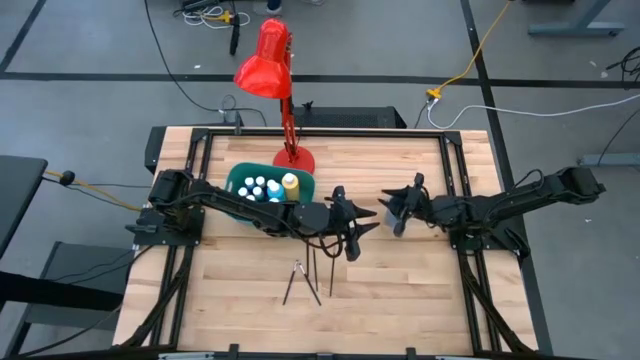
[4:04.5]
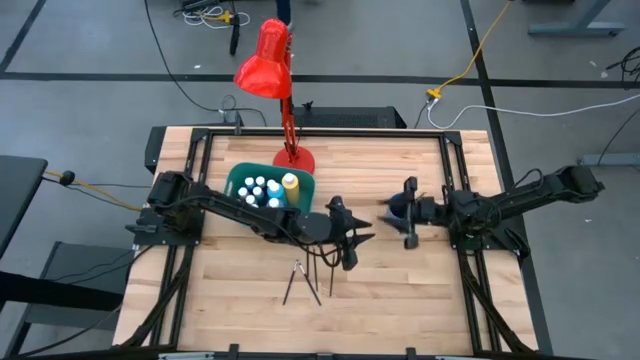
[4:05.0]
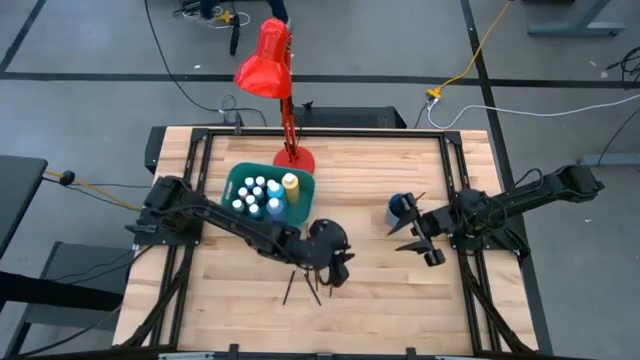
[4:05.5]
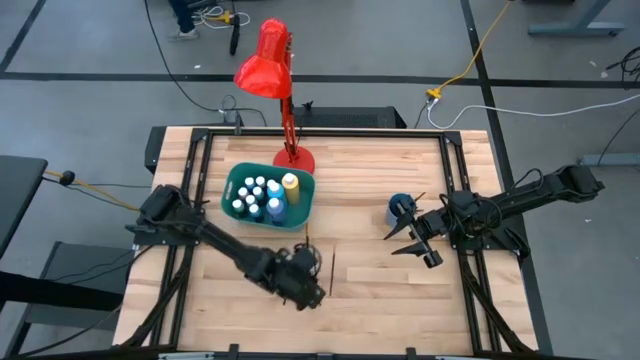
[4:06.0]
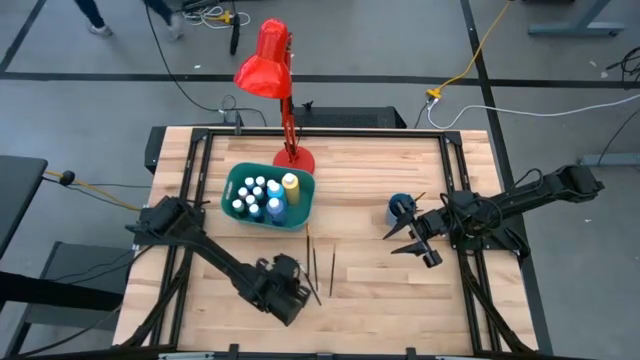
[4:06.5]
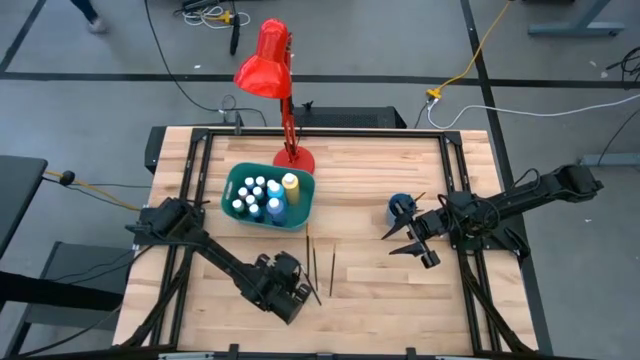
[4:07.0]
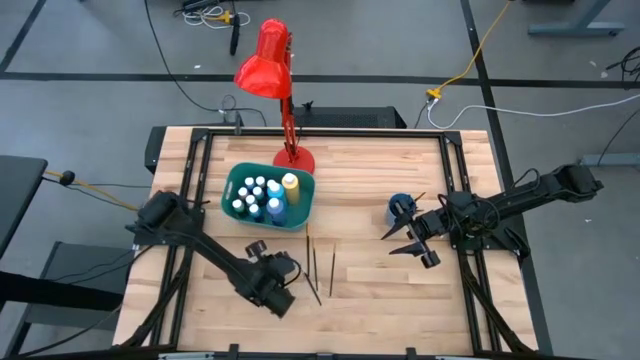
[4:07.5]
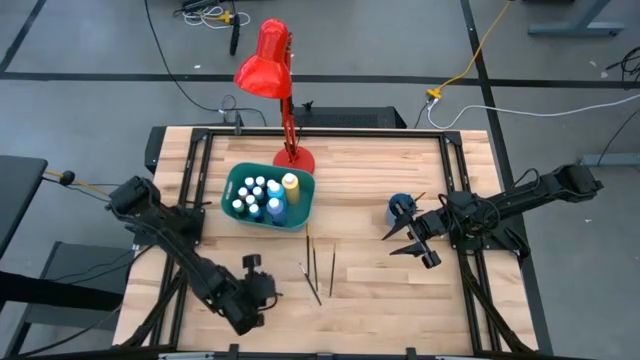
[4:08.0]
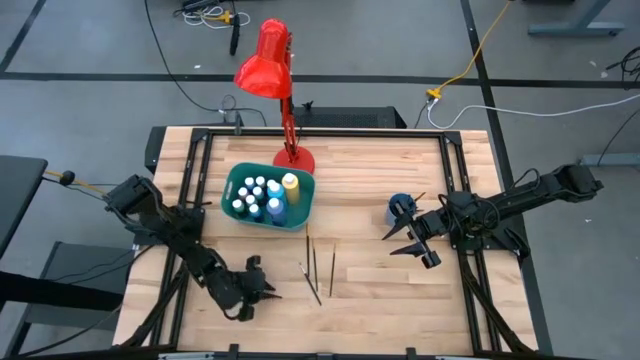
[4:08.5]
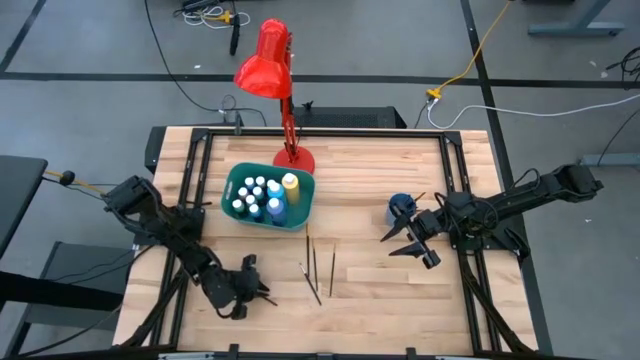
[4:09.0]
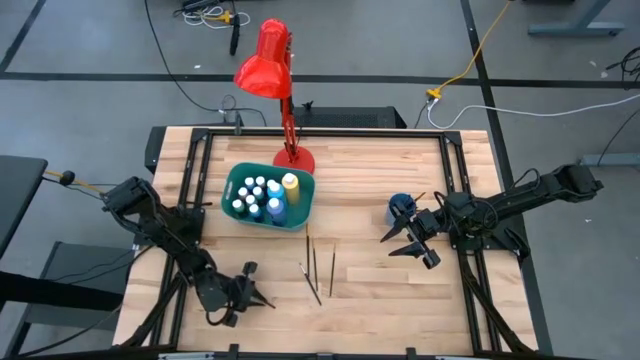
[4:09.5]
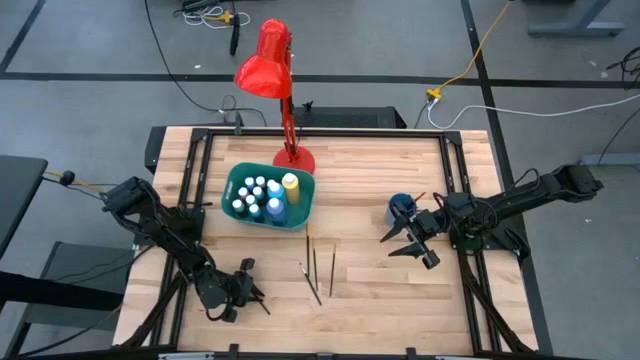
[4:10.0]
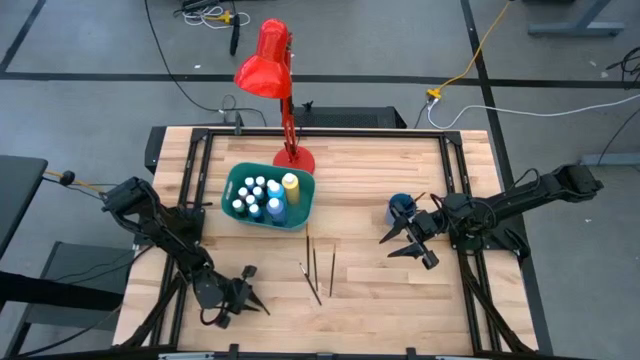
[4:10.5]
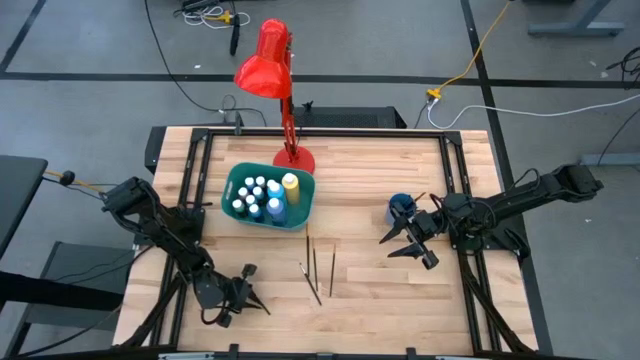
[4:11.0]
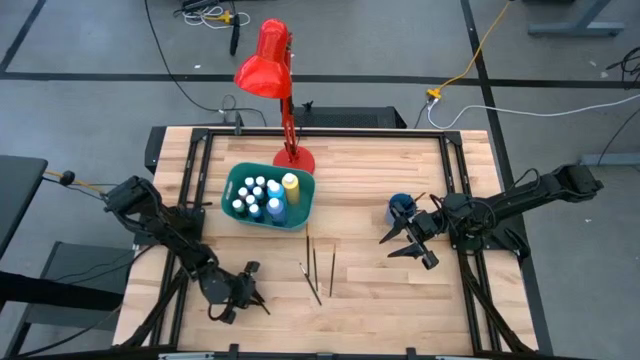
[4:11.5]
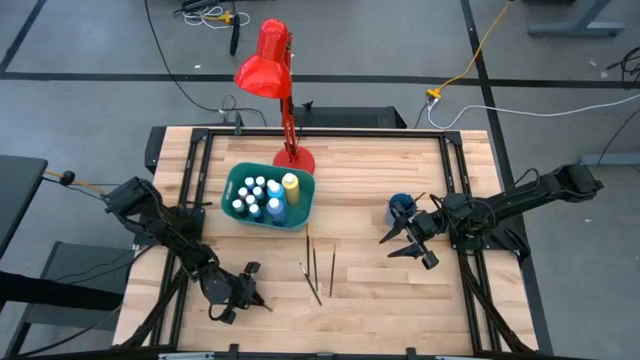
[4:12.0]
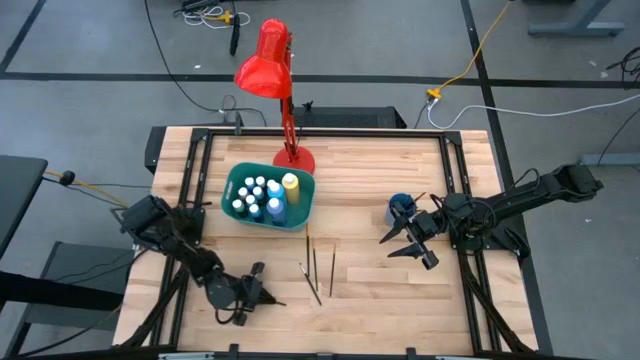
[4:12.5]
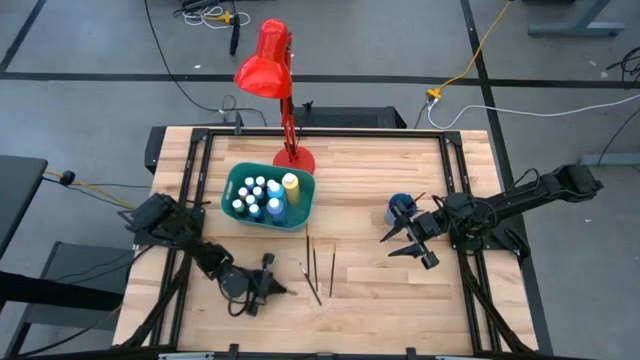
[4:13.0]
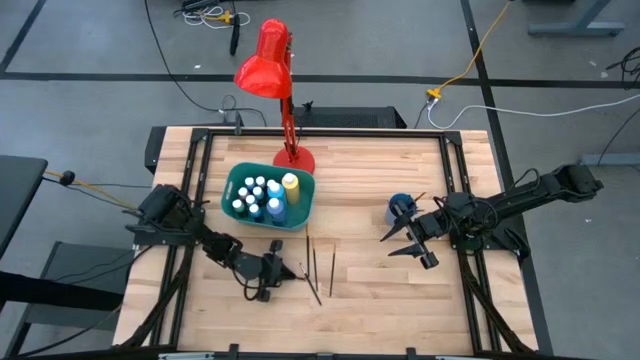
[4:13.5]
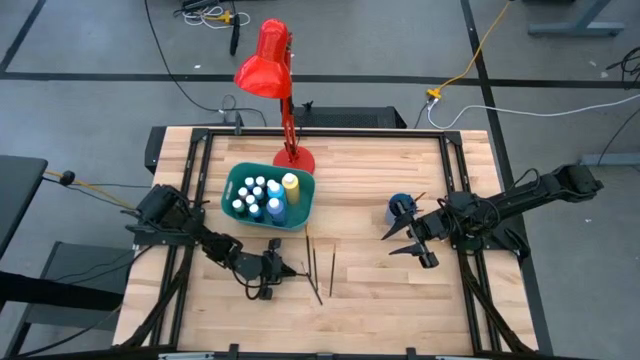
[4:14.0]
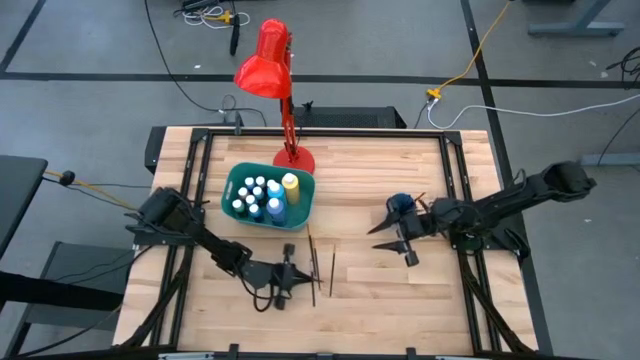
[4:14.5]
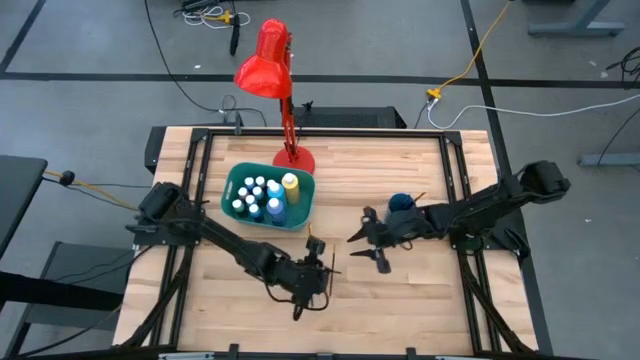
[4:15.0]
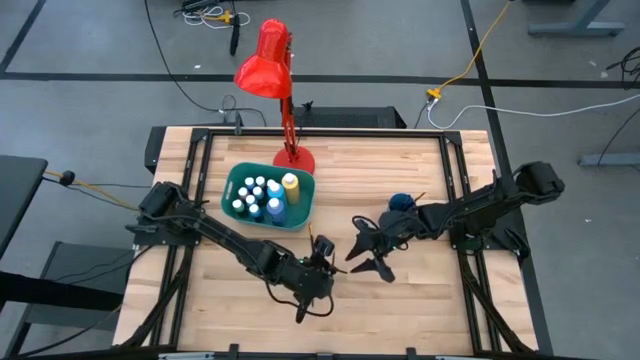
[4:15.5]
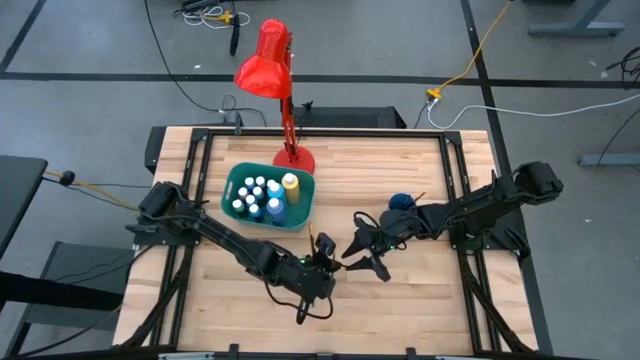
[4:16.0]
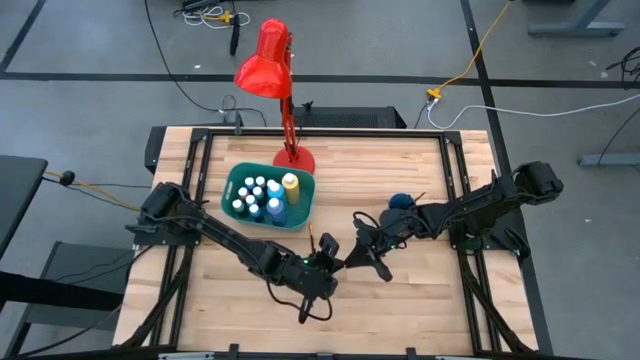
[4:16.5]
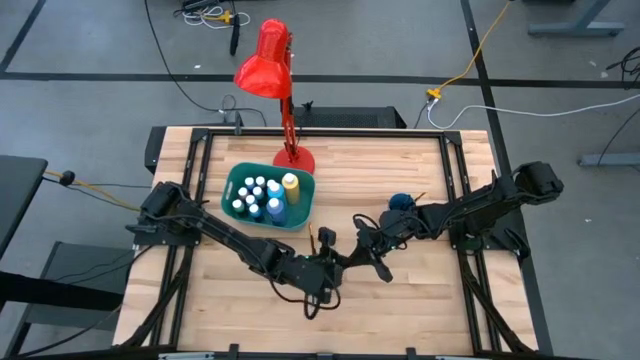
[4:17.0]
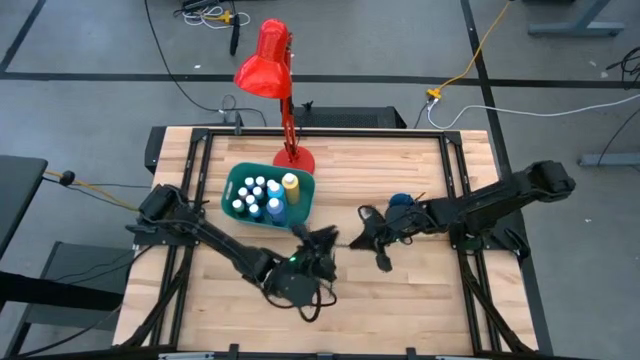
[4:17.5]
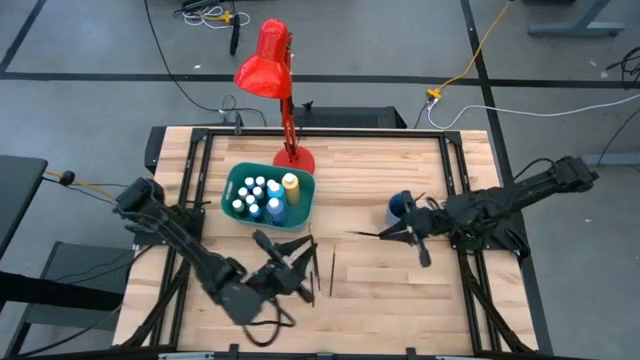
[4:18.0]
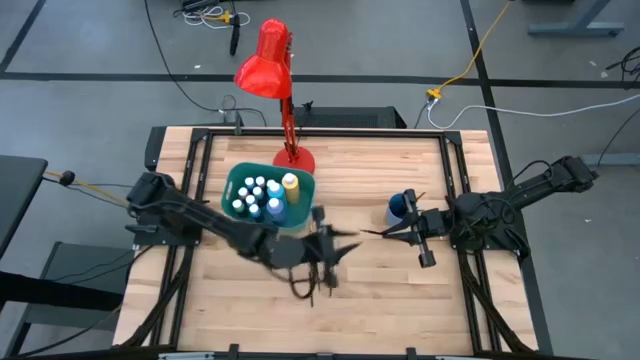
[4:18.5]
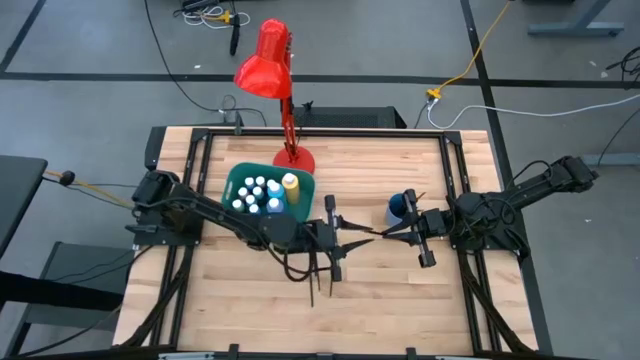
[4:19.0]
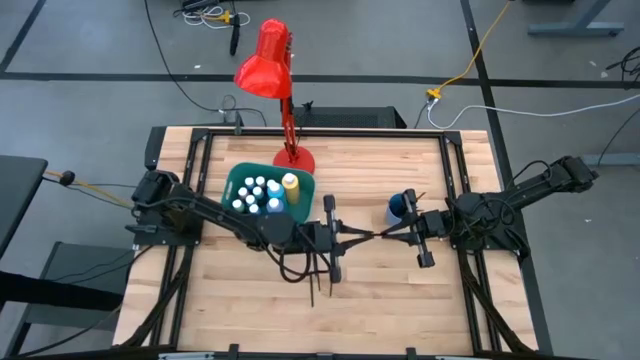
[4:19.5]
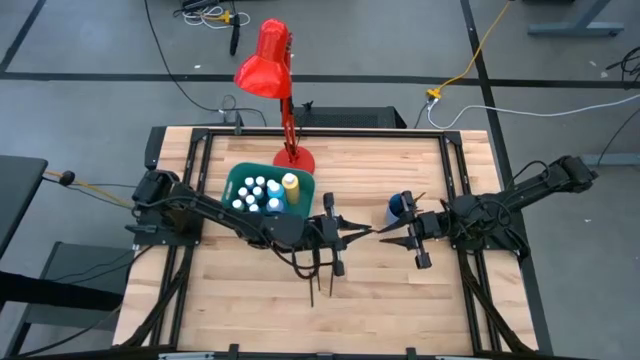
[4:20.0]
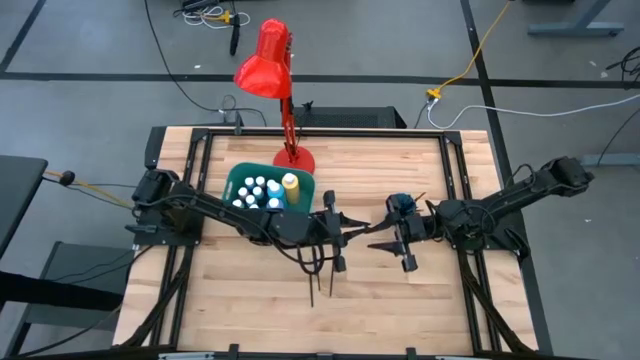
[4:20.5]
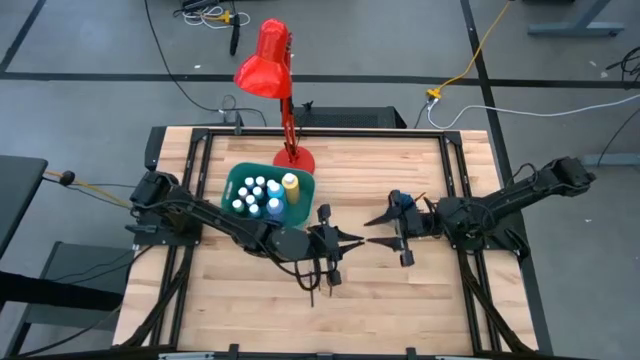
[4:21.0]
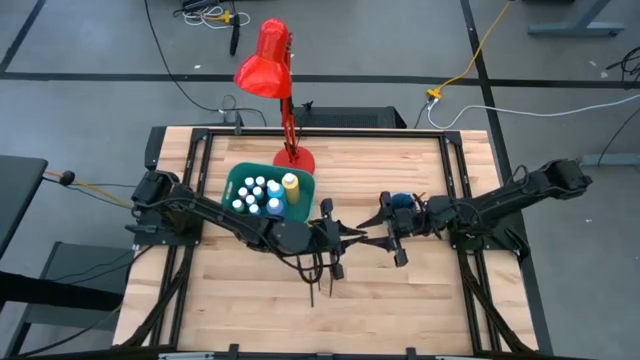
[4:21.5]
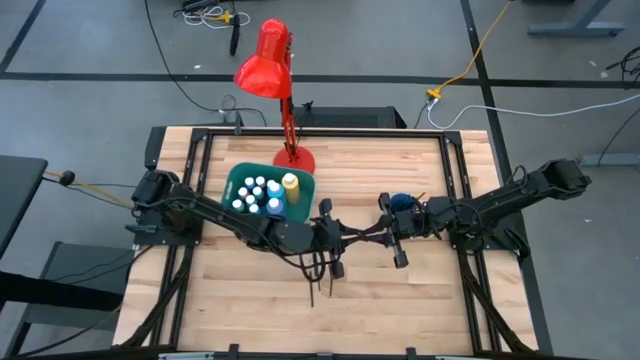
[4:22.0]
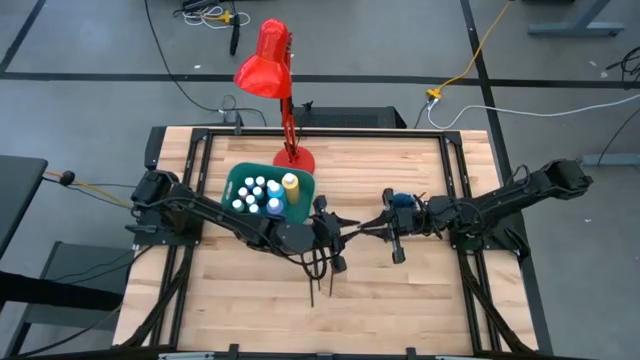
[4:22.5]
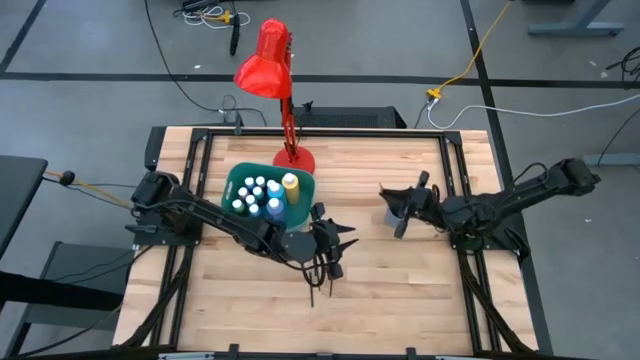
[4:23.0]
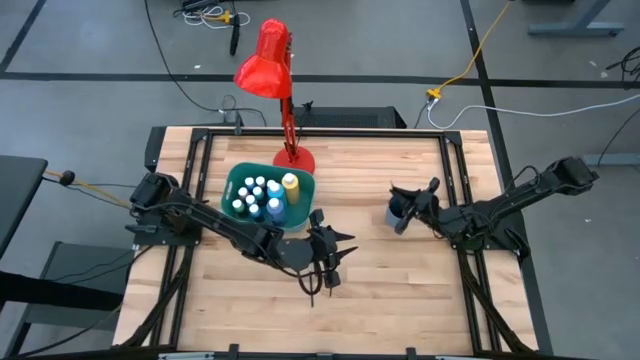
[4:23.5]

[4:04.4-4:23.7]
Task: Pick & Place Paint Supplies
Put the black silver paint brush into the blue cup

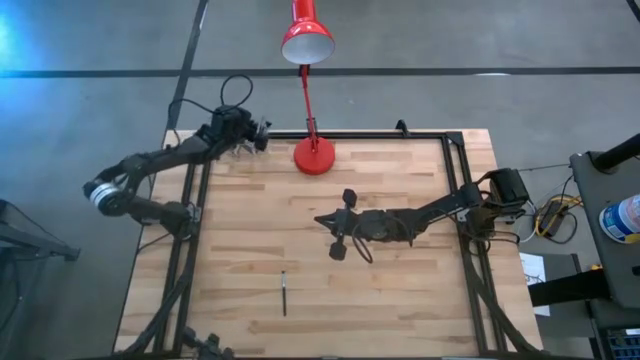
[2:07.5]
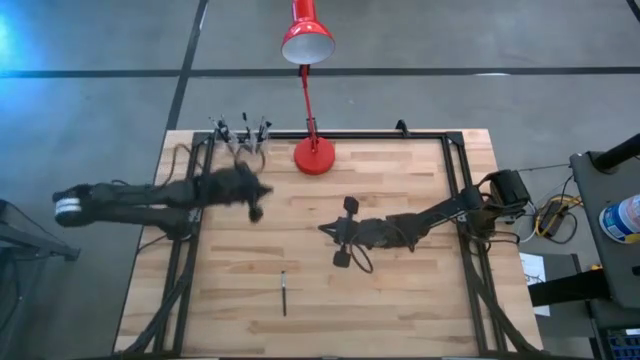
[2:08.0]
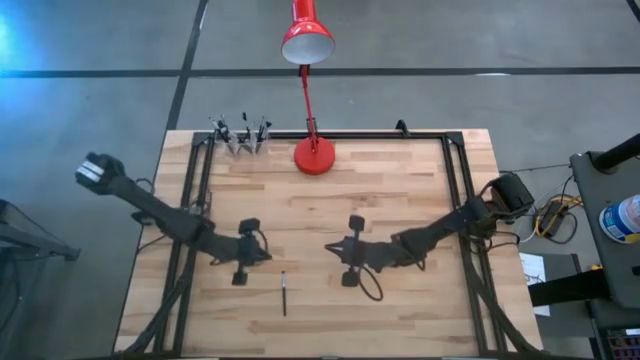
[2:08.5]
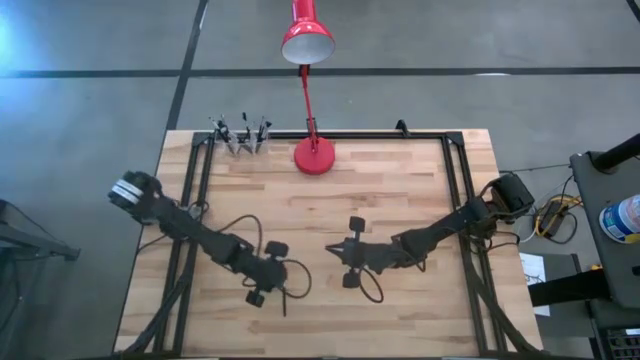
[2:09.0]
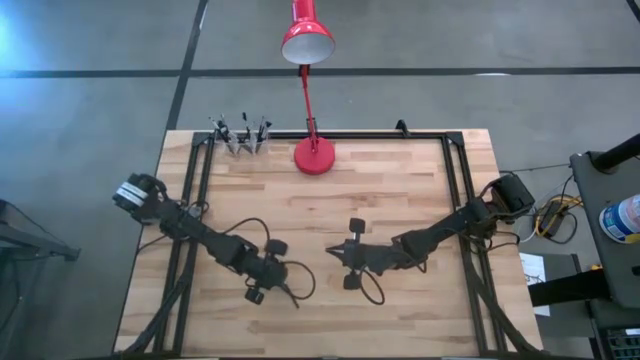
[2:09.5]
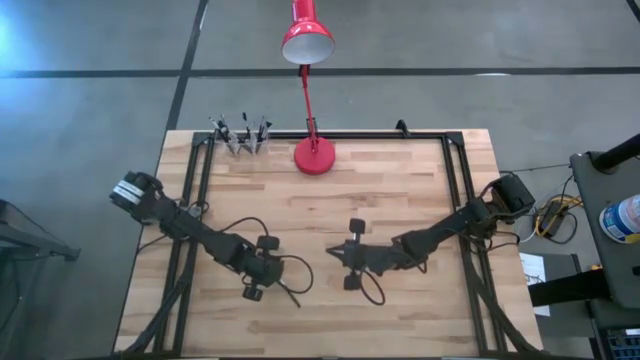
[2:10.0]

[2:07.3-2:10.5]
Task: Pick & Place Makeup Supplies
Put the makeup brush into the transparent organizer
